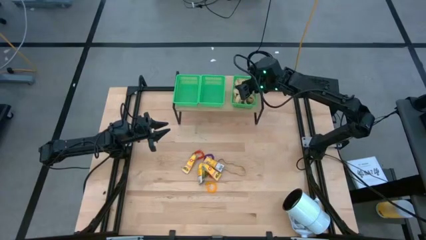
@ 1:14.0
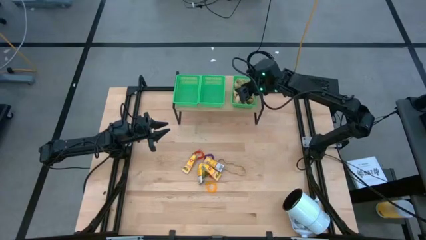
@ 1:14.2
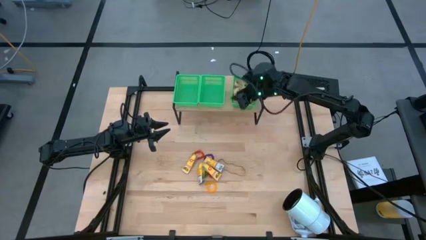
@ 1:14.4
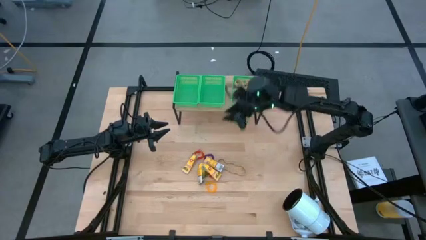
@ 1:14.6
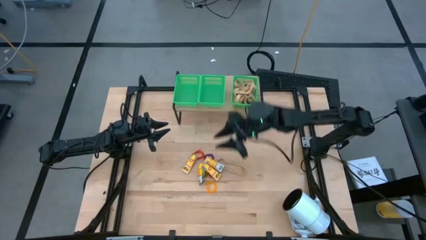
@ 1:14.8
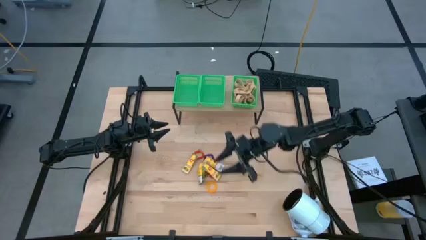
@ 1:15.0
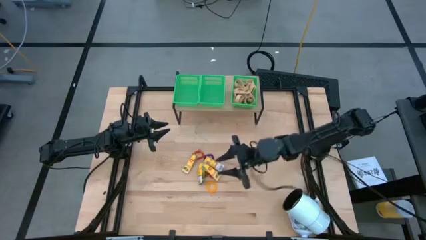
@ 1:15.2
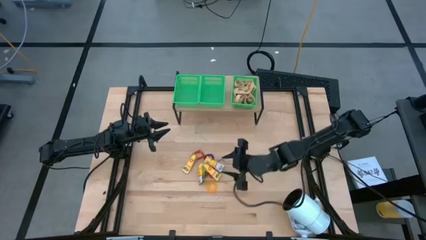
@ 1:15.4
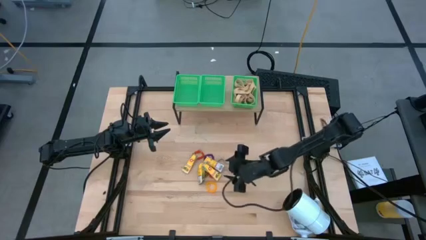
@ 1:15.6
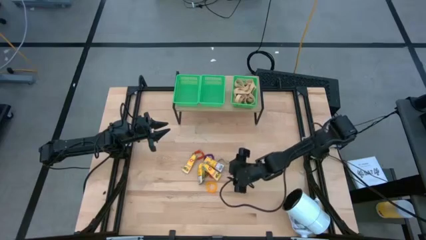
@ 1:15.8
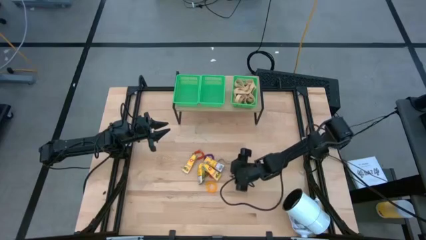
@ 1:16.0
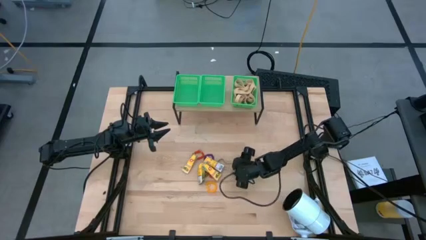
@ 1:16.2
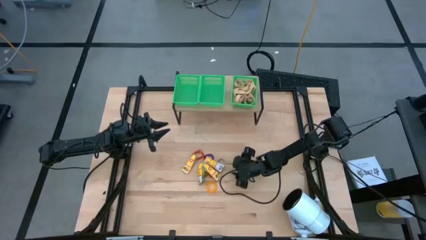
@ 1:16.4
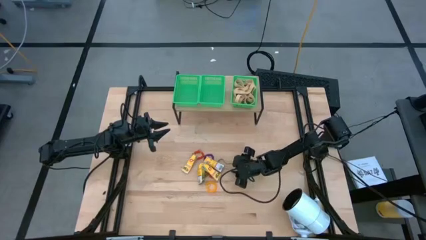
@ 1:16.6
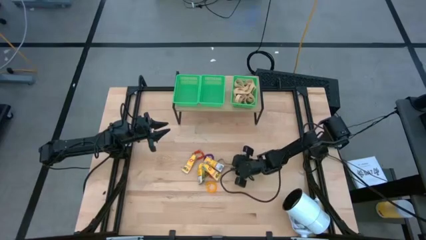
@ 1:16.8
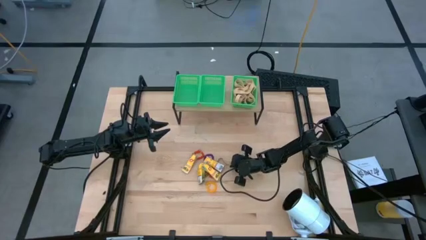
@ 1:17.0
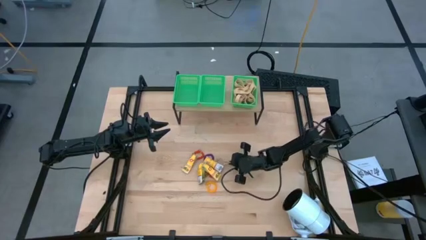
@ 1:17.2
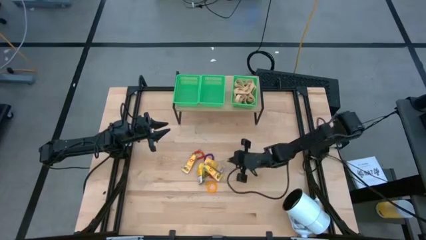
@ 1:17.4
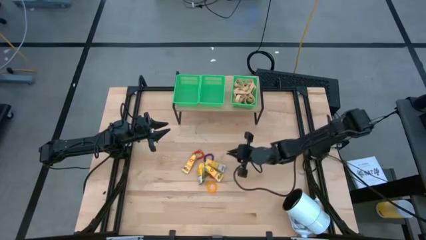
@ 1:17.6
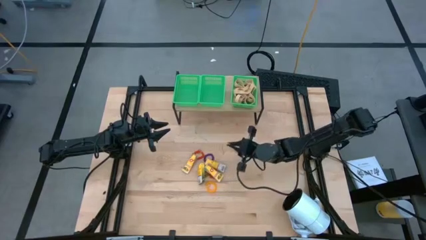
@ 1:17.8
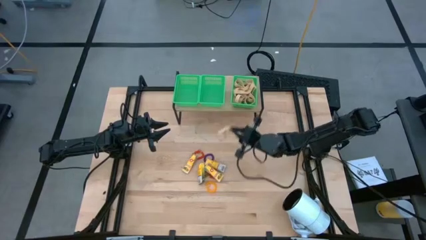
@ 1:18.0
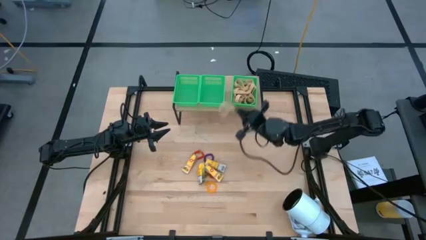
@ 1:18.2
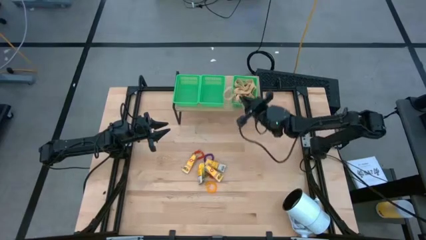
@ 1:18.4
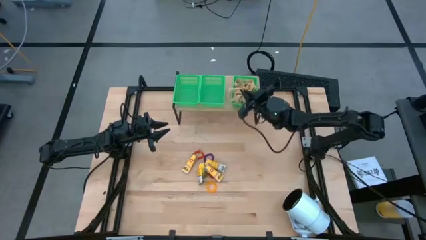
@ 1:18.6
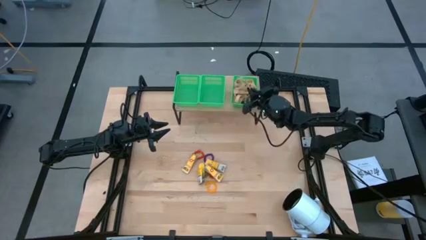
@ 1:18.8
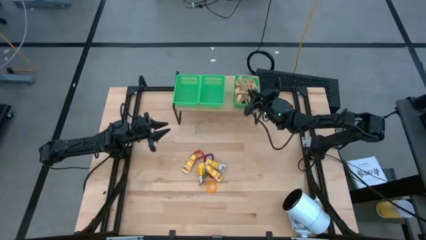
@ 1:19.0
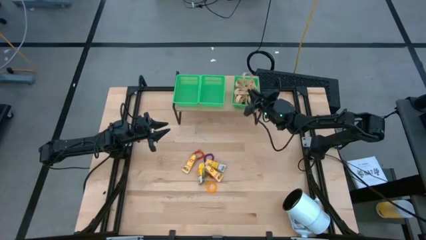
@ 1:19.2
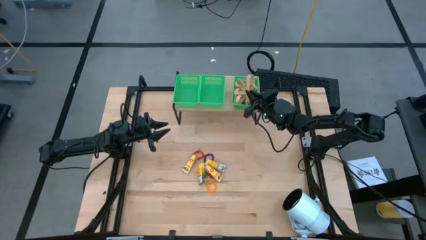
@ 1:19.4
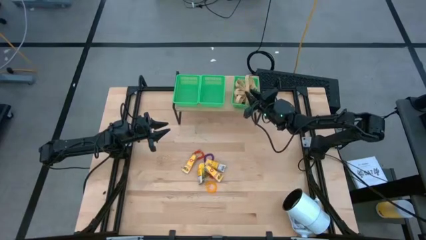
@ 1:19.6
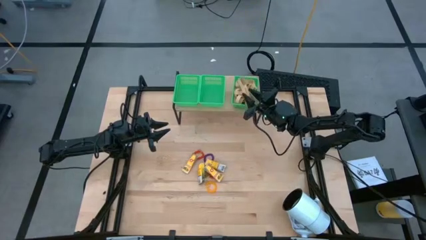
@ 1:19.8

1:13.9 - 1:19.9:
Task: Pick & Place Office Desk Supplies
Put the brown rubber band into the right green bin on the shelf

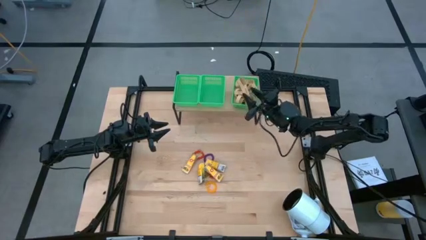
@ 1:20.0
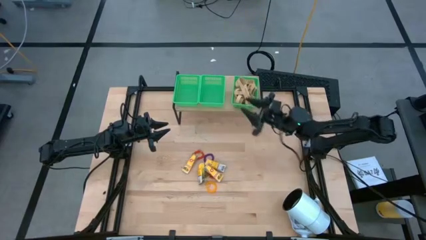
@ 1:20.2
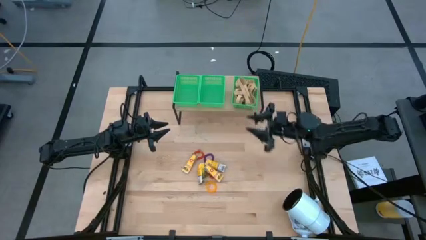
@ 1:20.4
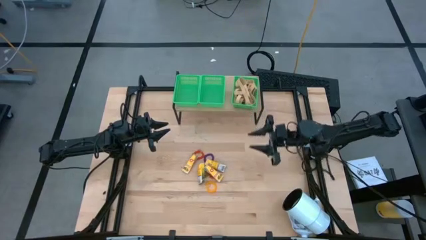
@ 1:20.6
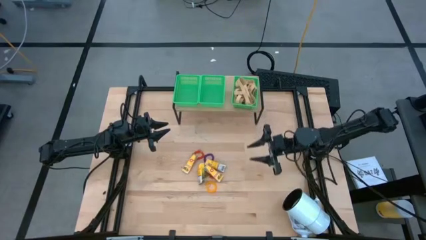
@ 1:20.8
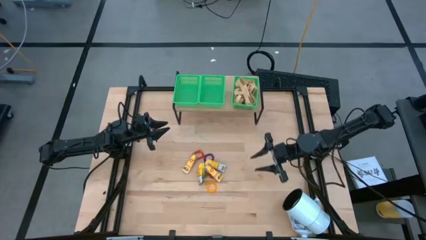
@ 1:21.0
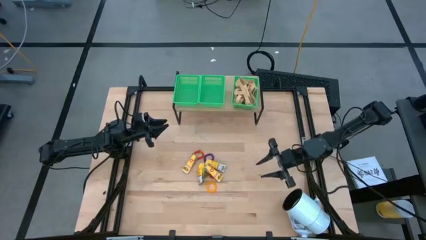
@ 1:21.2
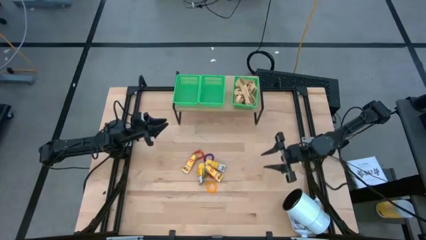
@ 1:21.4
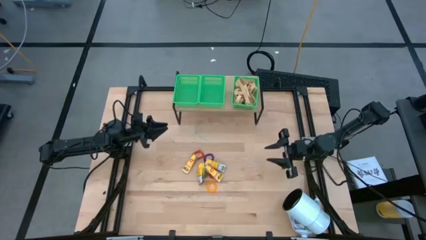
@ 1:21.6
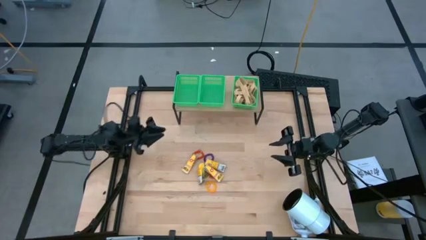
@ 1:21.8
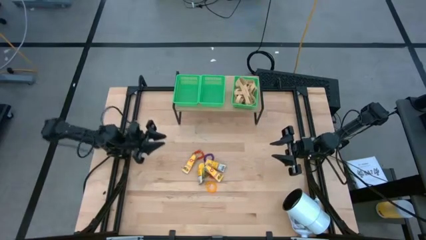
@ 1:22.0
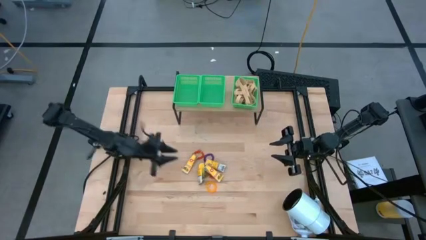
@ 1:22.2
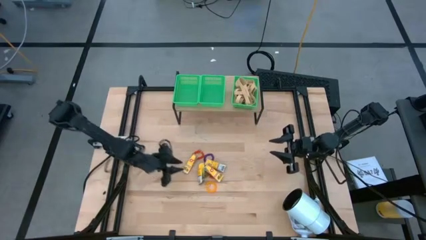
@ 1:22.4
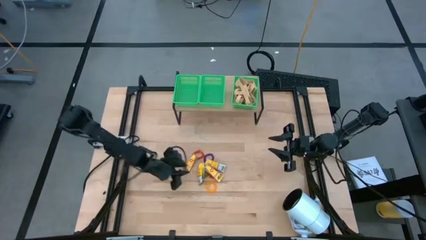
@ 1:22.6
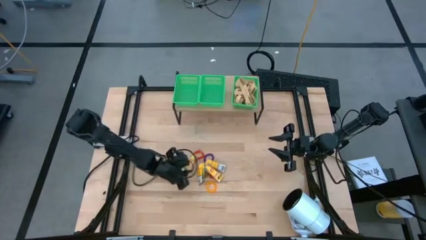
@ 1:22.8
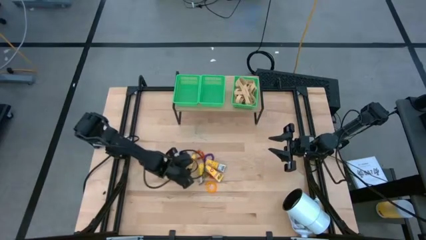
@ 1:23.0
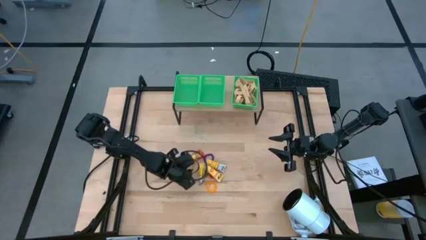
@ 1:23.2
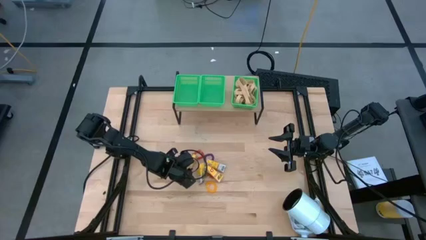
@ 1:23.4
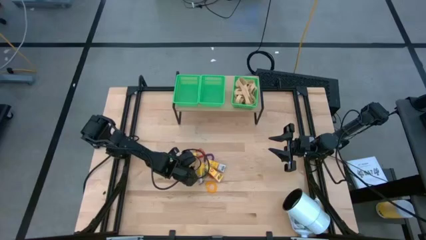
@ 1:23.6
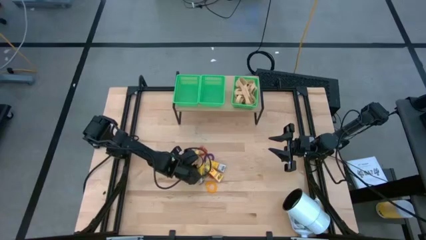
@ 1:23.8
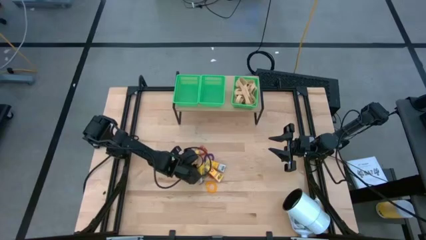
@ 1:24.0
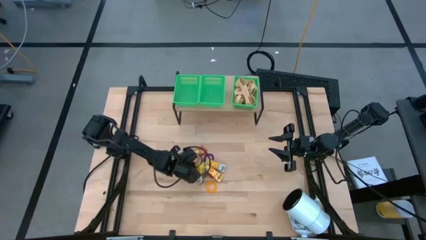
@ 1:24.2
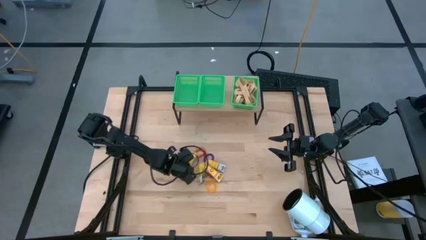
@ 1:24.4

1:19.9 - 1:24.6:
Put the yellow crayon box into the middle green bin on the shelf

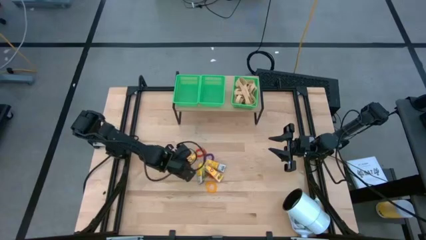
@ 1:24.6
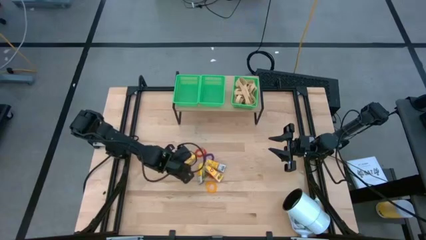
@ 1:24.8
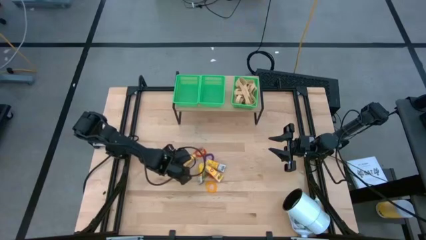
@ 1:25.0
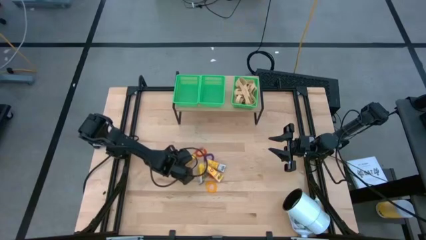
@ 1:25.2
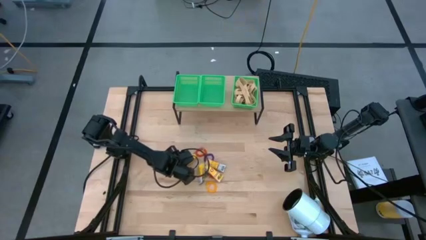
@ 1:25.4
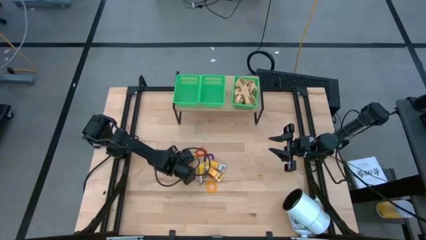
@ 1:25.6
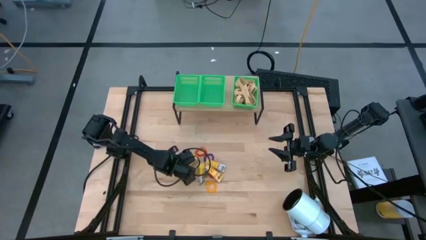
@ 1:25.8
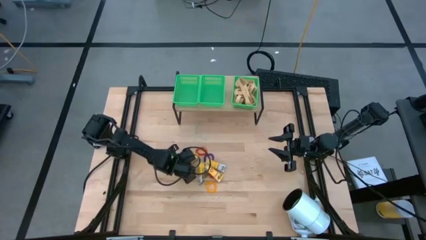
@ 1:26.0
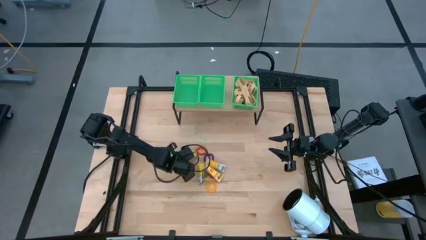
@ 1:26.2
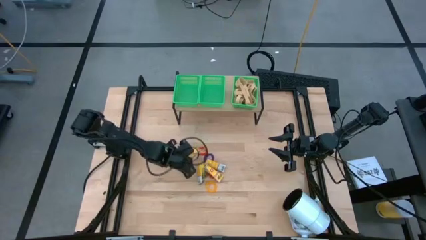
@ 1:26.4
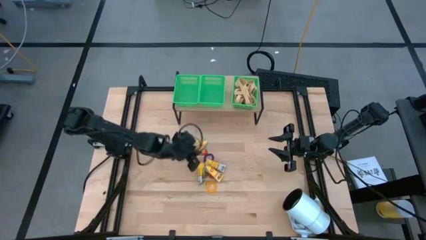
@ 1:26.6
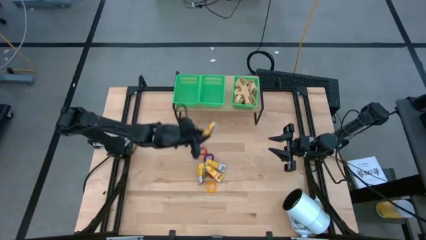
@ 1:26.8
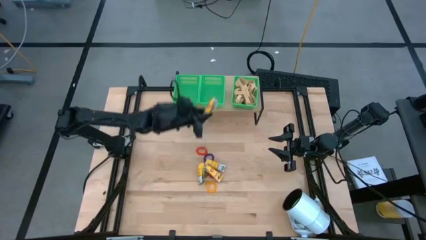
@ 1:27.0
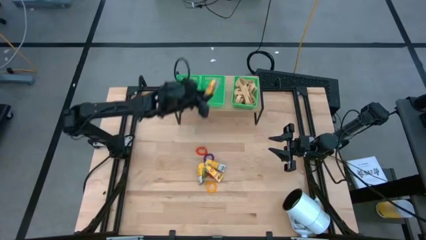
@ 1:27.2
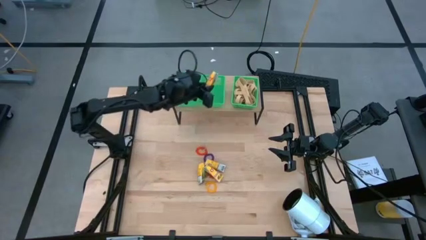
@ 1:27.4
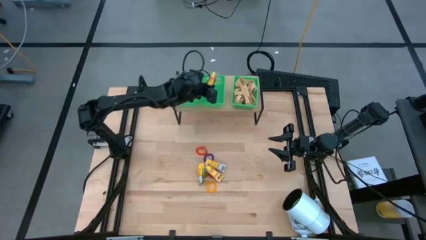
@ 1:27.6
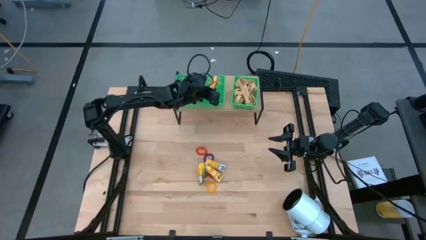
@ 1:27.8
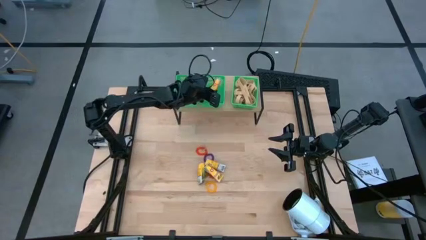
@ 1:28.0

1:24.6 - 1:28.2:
Put the yellow crayon box into the middle green bin on the shelf

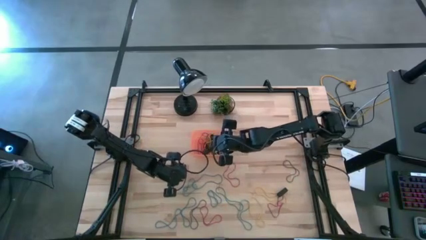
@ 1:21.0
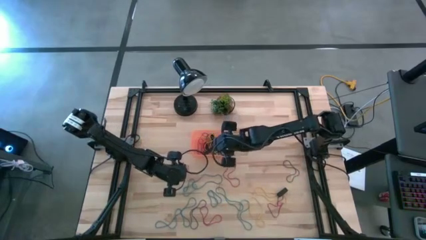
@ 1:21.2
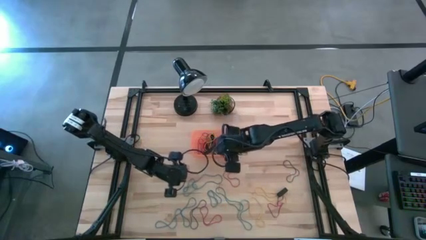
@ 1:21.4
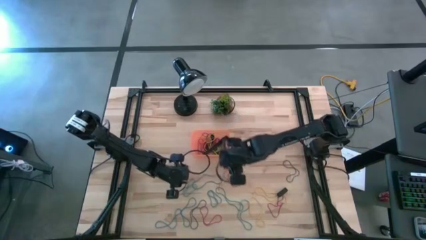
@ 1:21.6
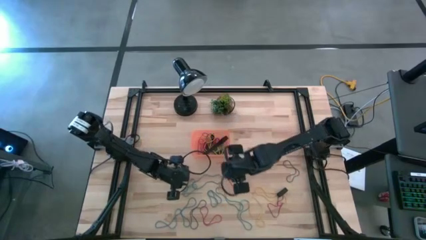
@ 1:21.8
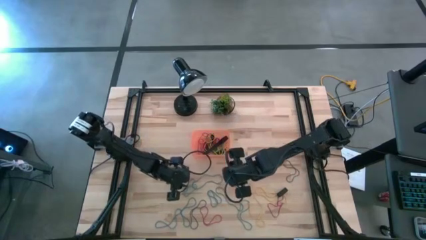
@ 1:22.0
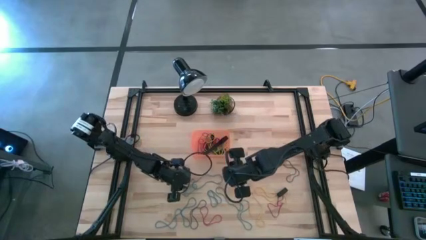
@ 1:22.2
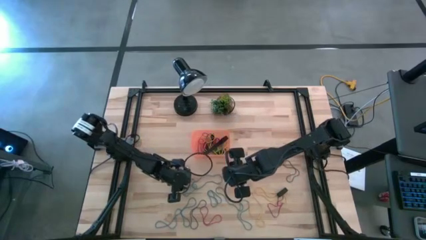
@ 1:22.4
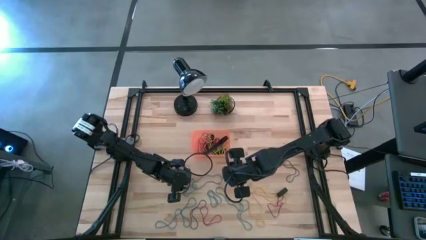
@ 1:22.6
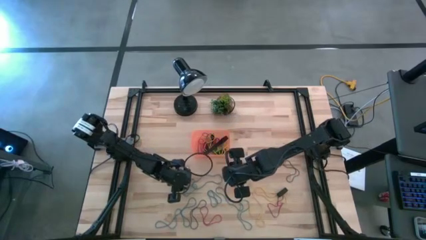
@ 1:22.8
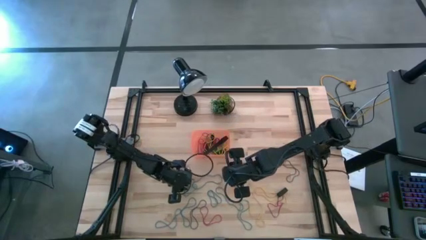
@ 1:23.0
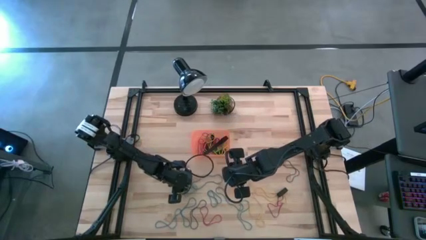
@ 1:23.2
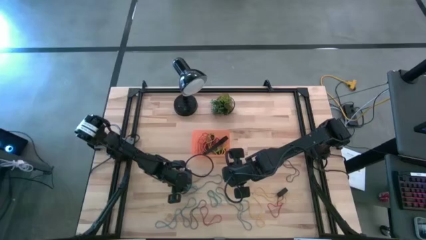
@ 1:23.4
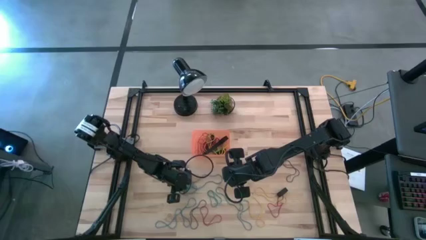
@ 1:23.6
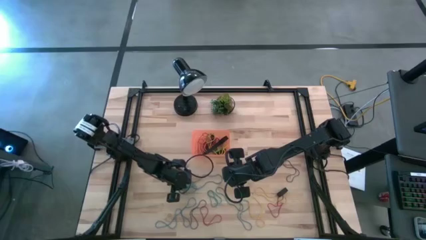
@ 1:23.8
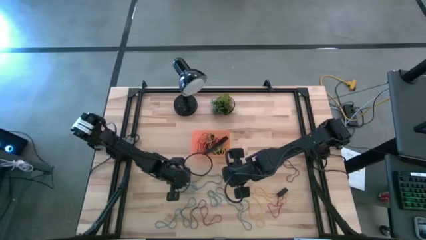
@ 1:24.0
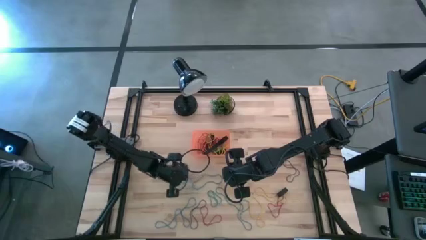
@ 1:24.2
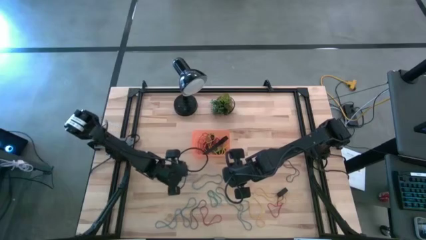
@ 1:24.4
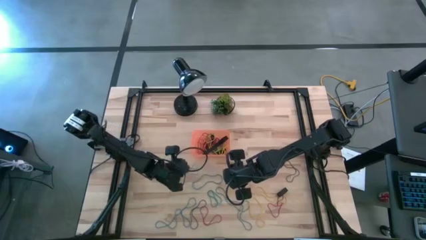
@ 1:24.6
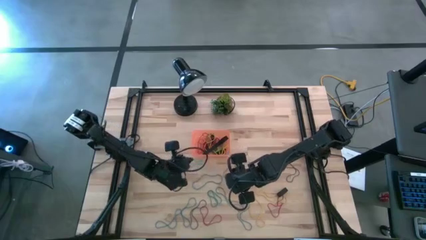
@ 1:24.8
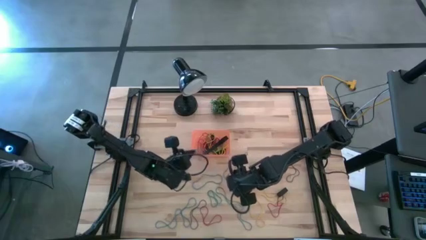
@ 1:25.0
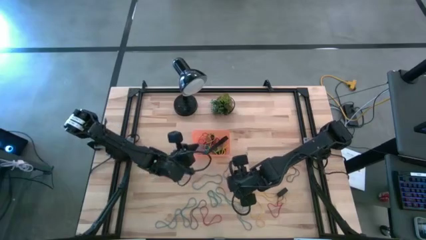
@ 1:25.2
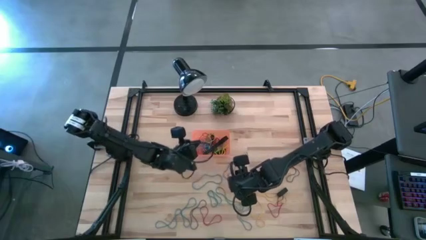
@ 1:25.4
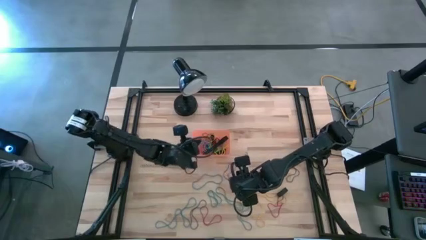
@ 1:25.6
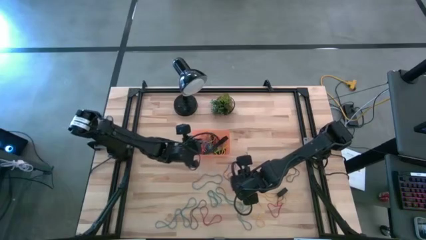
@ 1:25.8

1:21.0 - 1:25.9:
Task: Pick and place rubber bands into bin
Put the blue rubberbands into the orange bin
